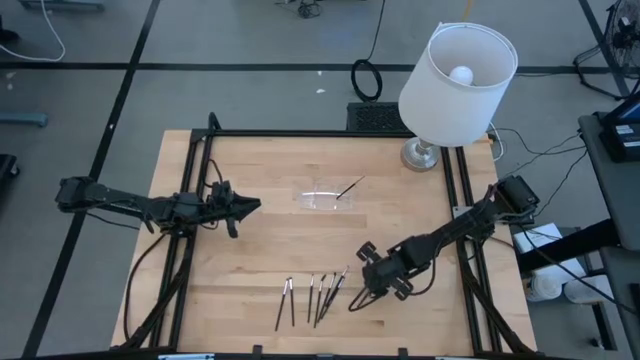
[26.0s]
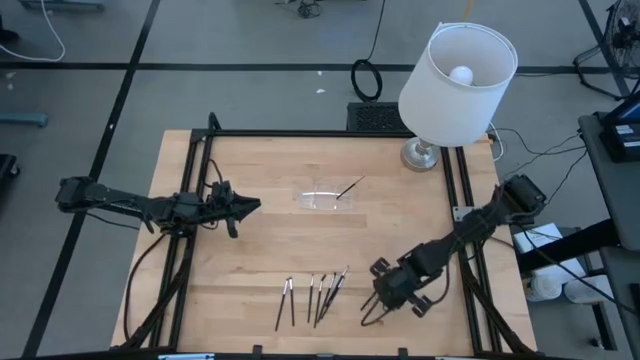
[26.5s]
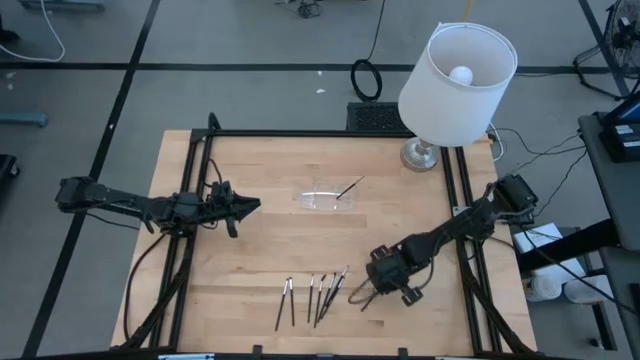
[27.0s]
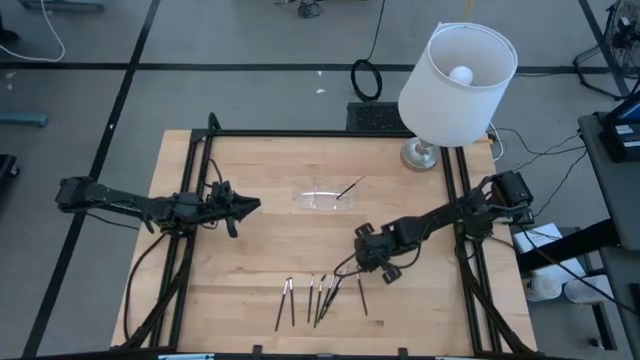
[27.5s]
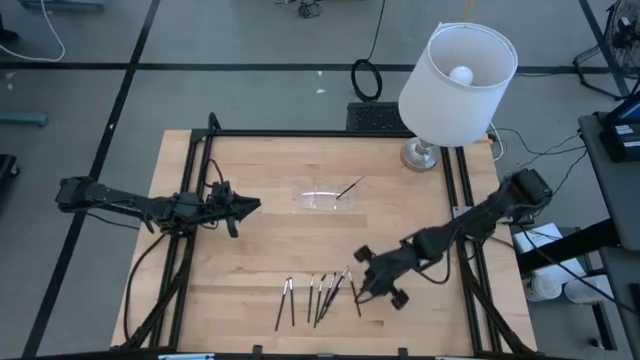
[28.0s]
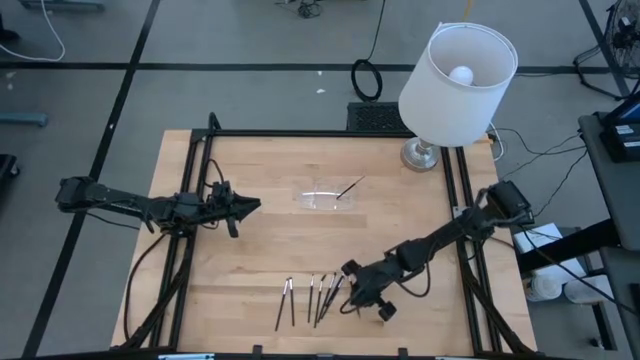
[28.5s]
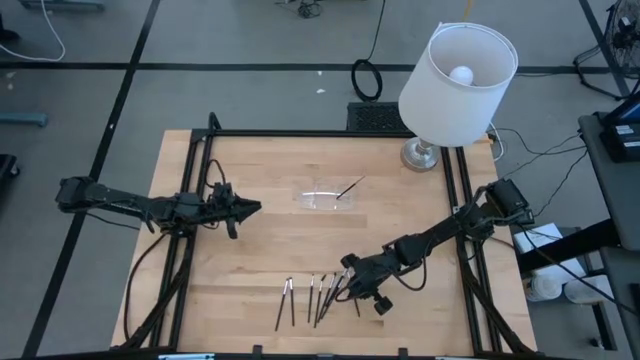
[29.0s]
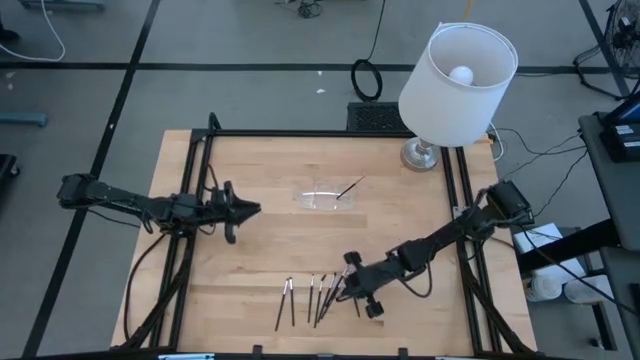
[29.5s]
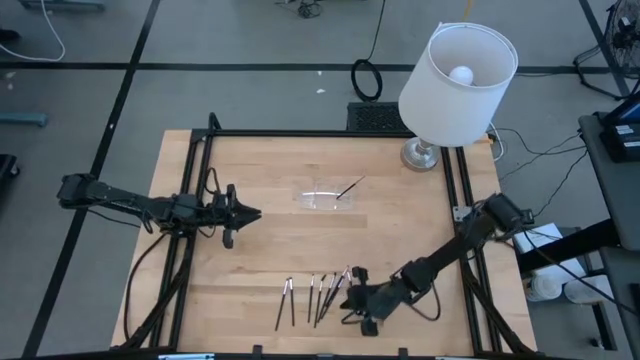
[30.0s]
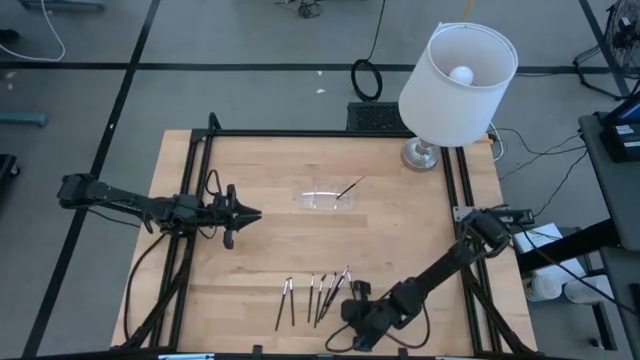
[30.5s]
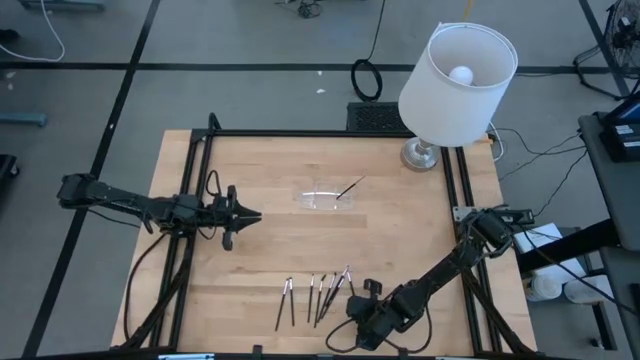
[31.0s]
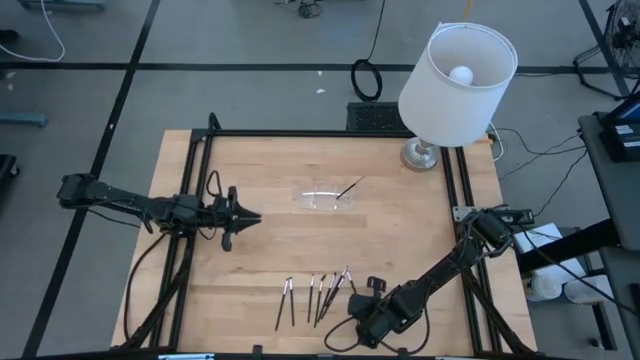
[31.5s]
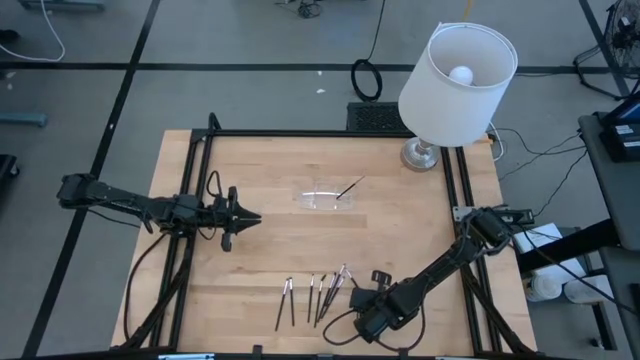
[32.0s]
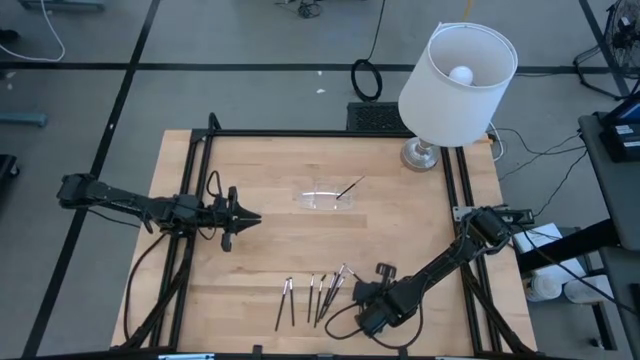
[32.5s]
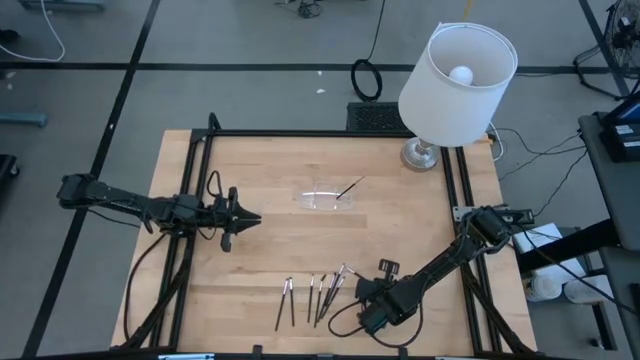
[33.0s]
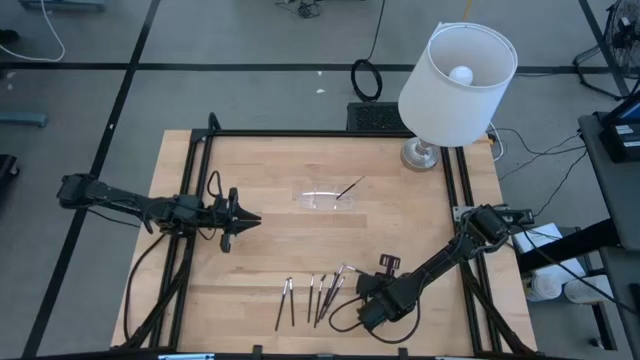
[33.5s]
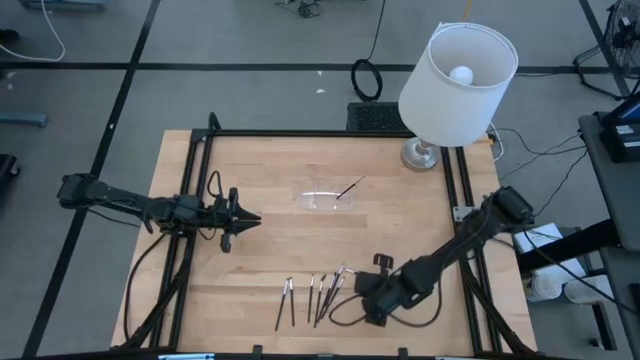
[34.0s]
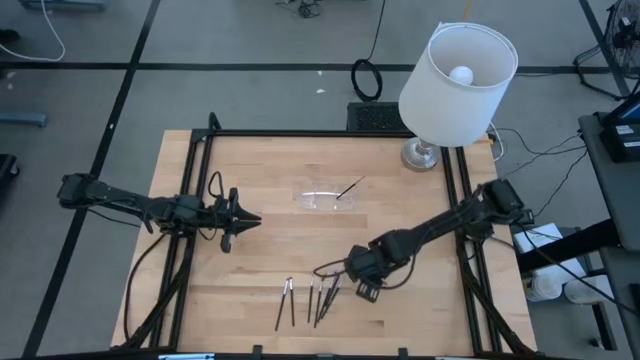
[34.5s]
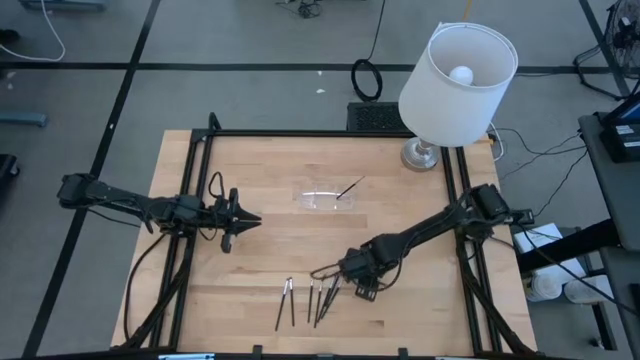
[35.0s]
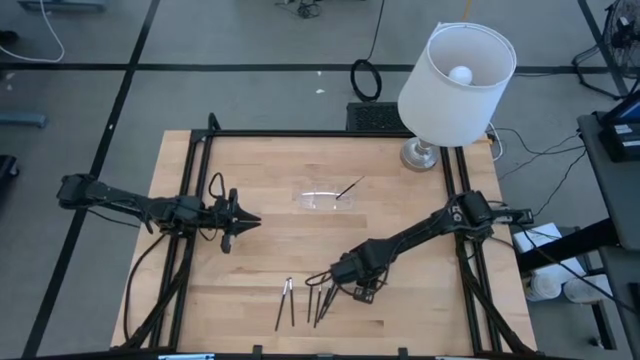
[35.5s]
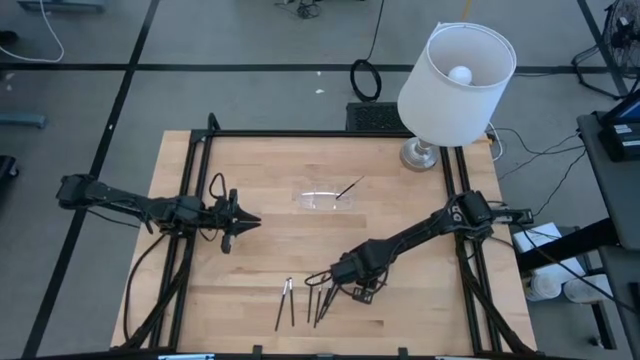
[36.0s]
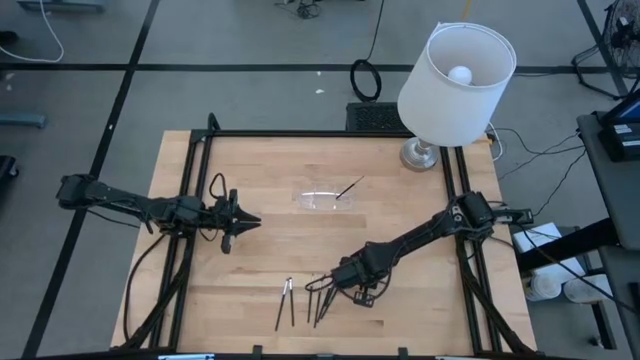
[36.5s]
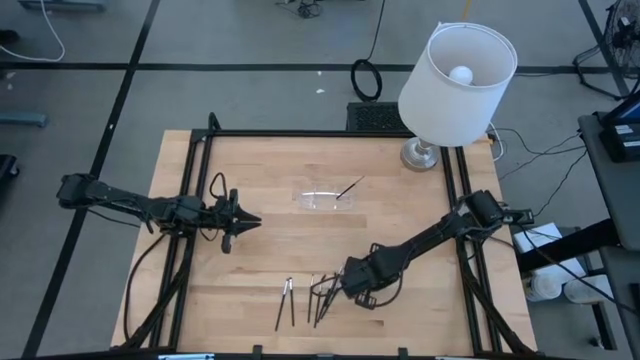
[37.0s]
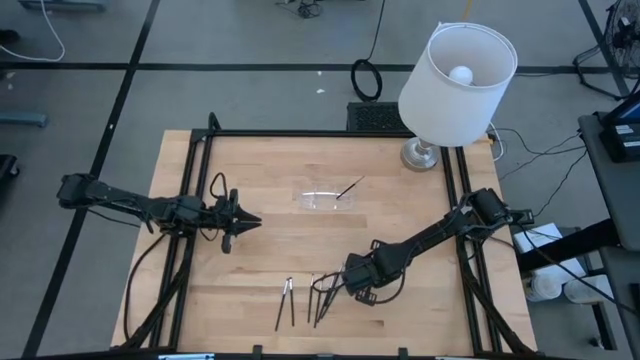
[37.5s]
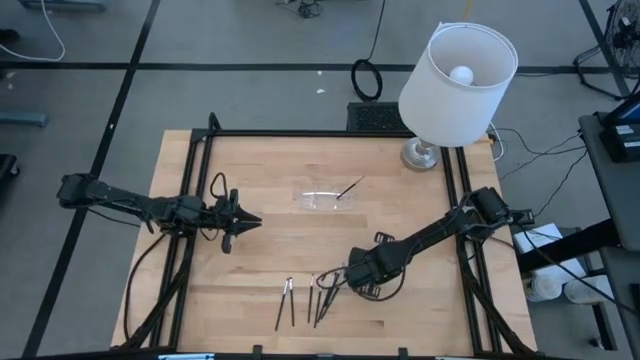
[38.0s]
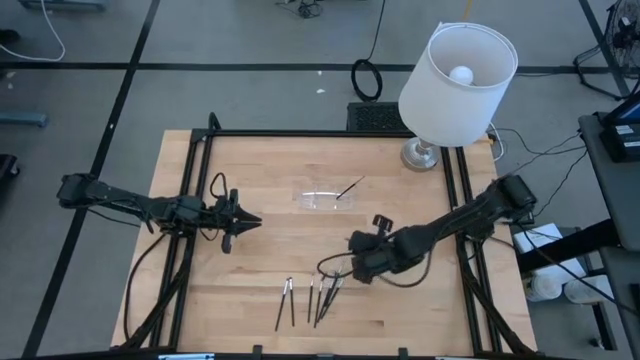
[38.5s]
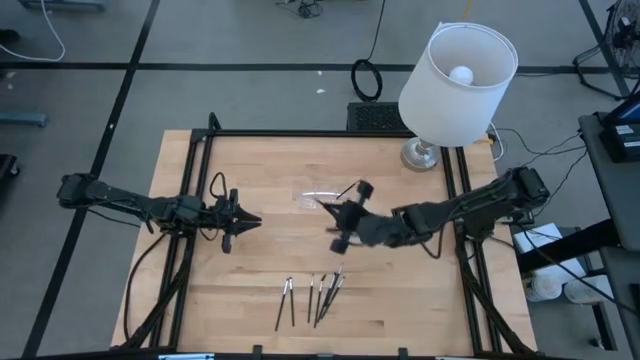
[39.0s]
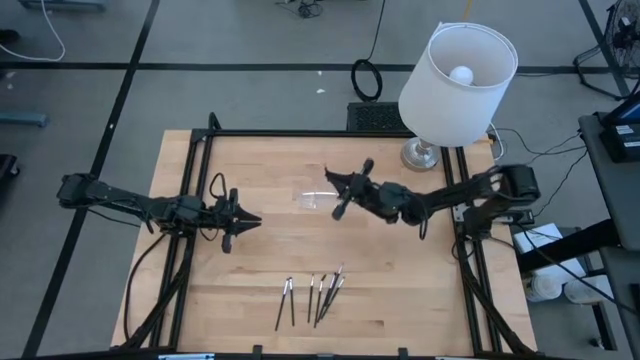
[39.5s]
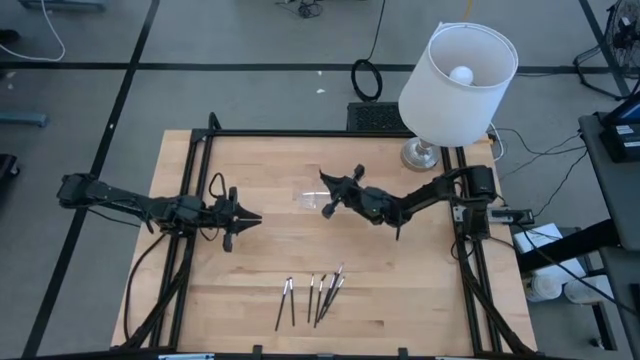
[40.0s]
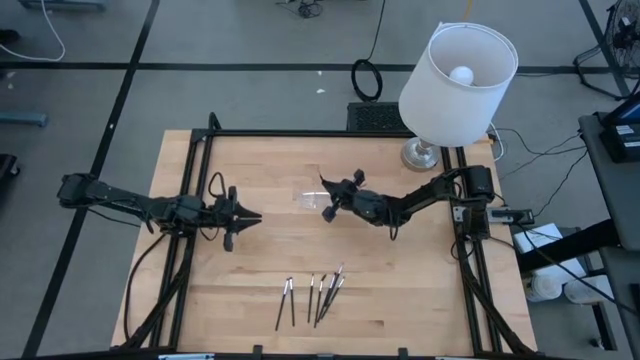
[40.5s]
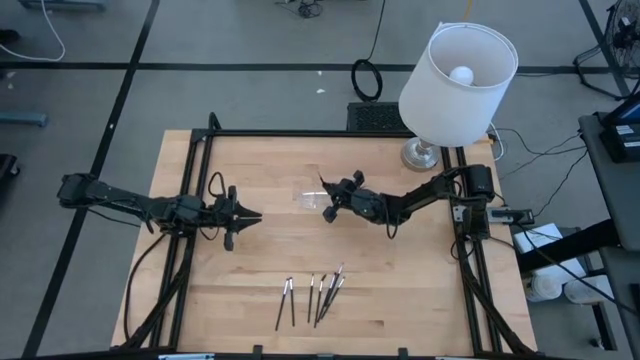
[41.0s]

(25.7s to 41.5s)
Task: Put items in baskets/containers
Put the black liner brush into the transparent organizer
